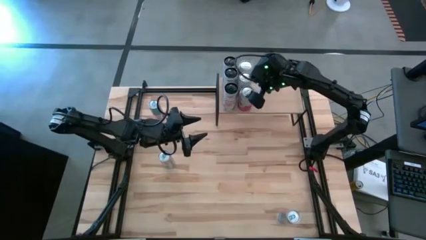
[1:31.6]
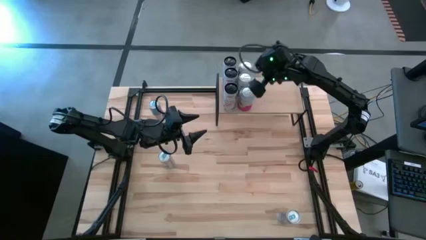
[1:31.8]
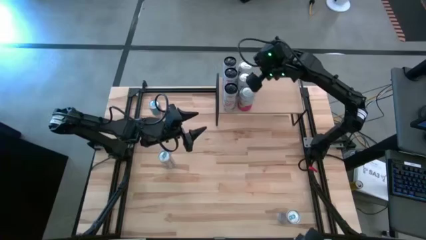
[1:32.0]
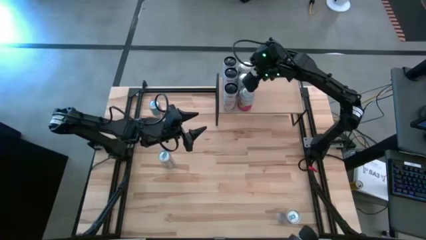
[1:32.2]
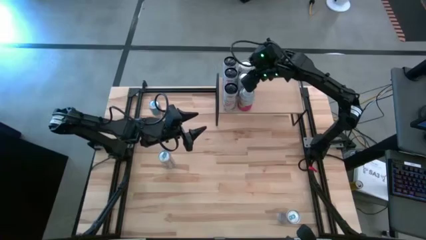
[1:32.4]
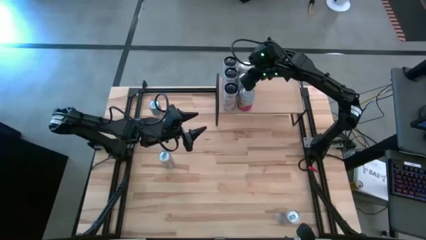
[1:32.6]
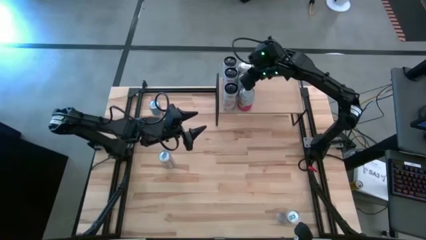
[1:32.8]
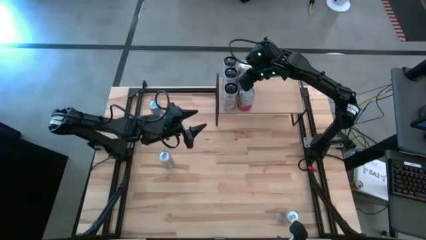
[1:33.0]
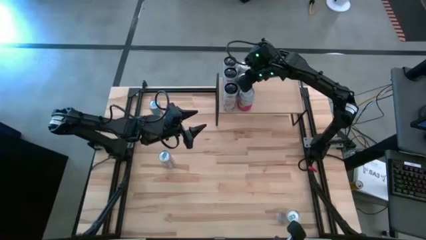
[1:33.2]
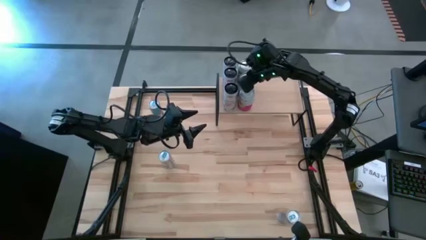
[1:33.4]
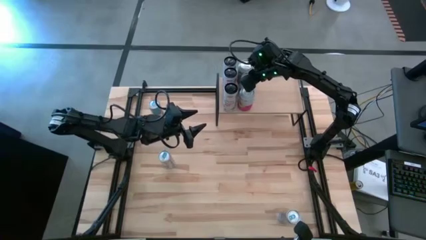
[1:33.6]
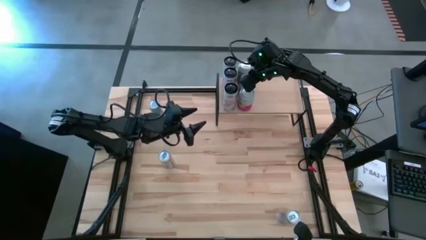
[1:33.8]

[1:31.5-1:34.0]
Task: Place canned beverage on shelf
Adjust the pink-white soda can on the shelf

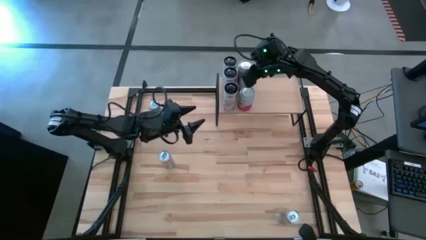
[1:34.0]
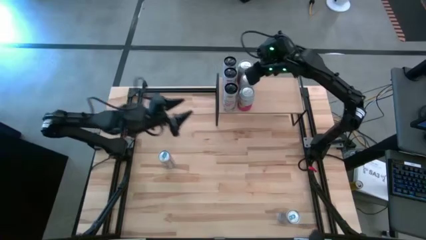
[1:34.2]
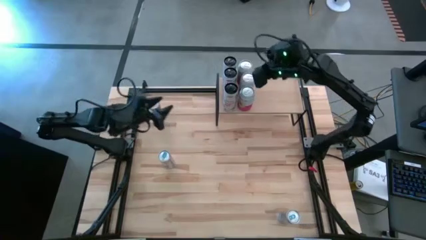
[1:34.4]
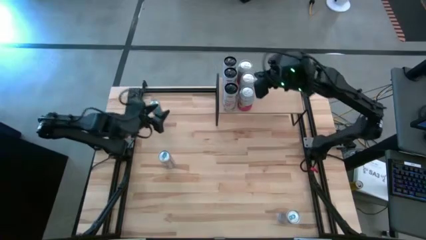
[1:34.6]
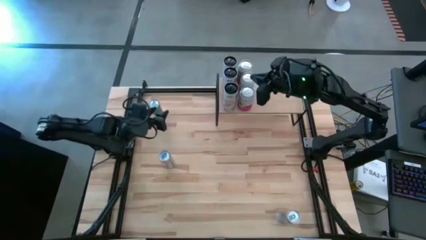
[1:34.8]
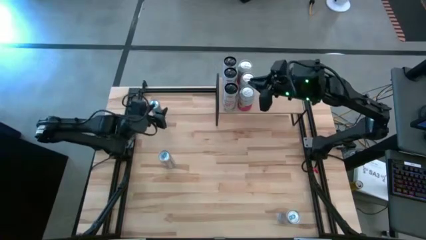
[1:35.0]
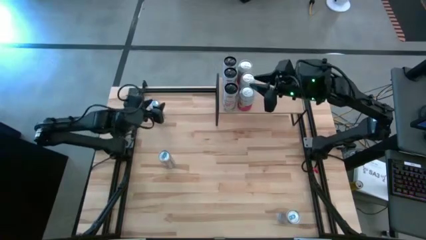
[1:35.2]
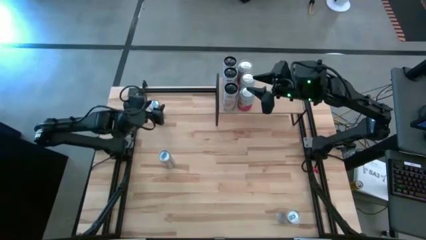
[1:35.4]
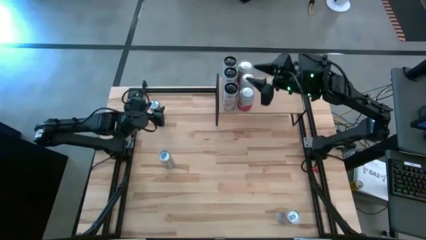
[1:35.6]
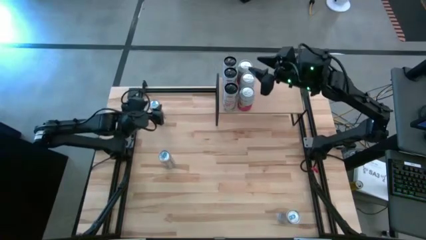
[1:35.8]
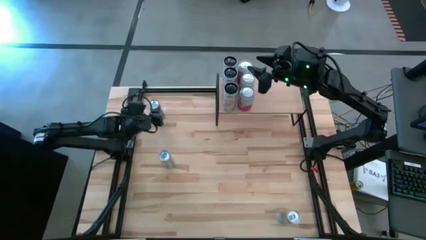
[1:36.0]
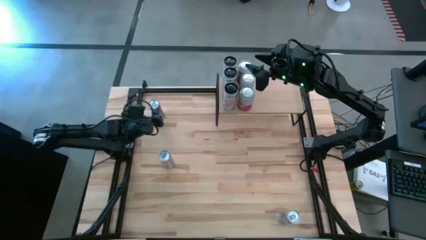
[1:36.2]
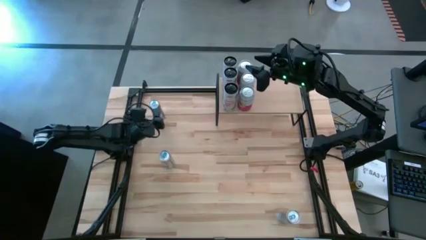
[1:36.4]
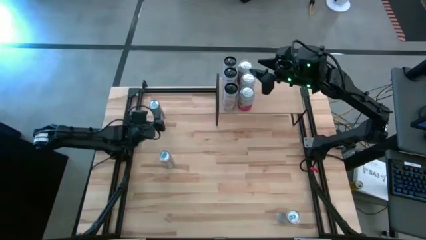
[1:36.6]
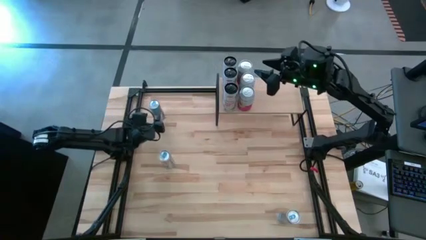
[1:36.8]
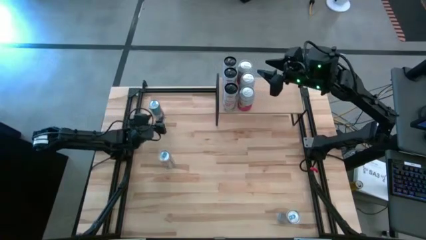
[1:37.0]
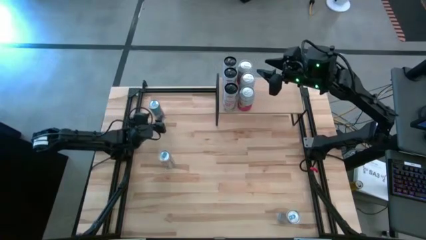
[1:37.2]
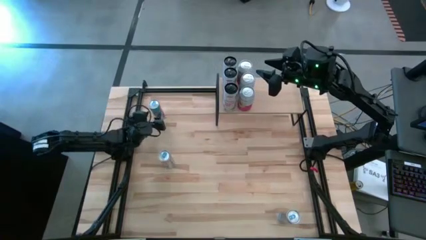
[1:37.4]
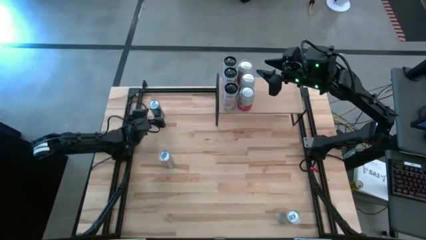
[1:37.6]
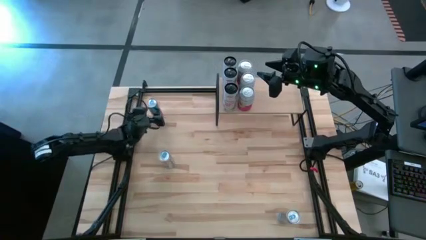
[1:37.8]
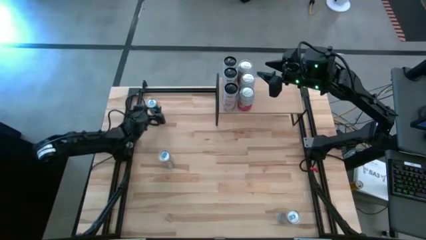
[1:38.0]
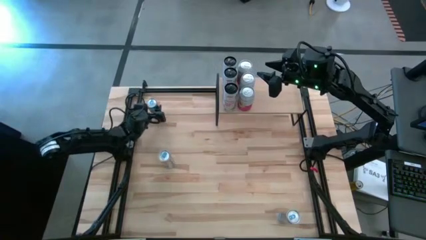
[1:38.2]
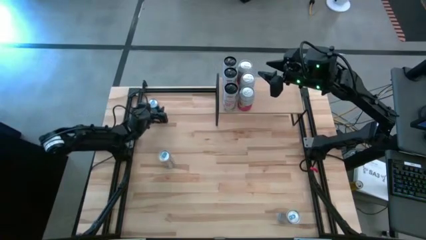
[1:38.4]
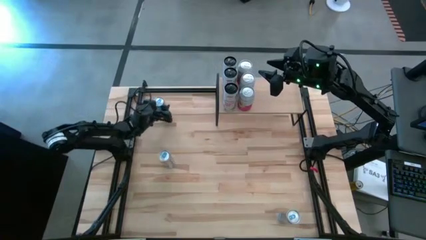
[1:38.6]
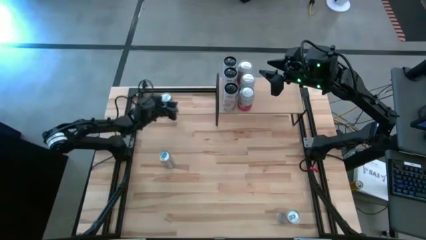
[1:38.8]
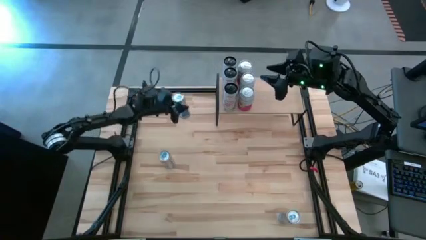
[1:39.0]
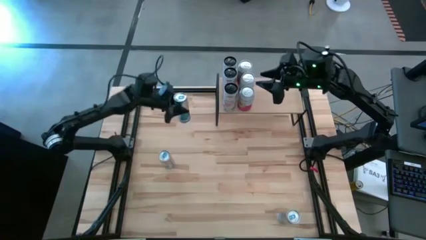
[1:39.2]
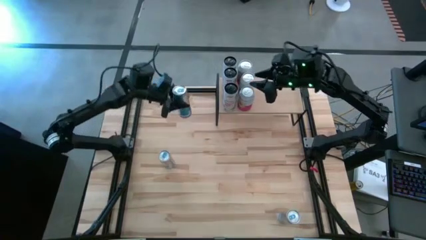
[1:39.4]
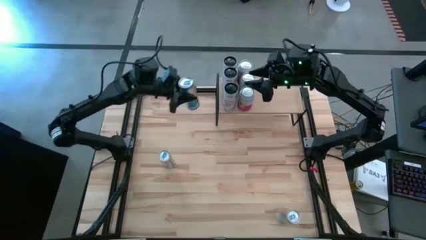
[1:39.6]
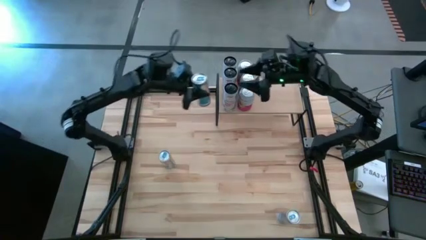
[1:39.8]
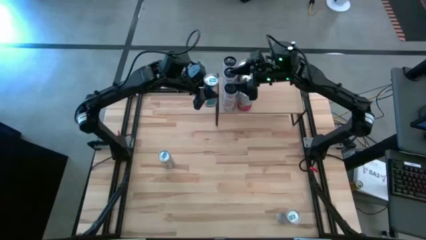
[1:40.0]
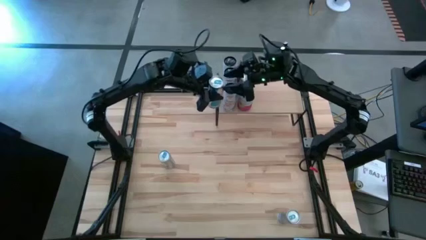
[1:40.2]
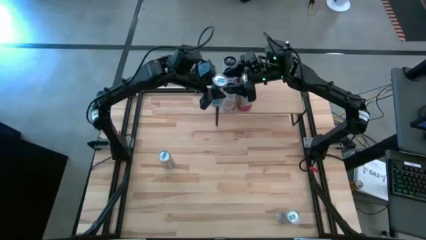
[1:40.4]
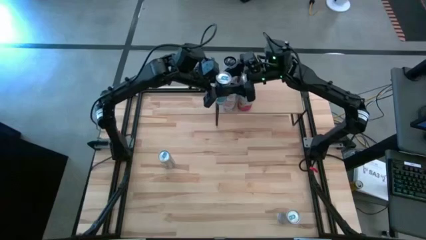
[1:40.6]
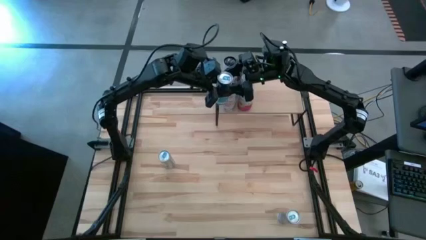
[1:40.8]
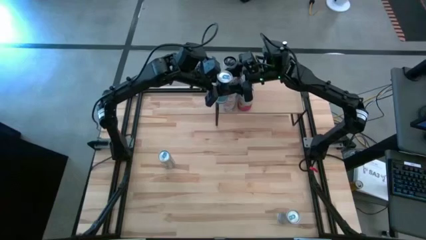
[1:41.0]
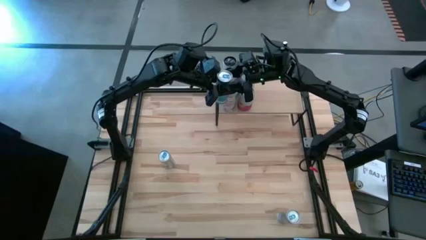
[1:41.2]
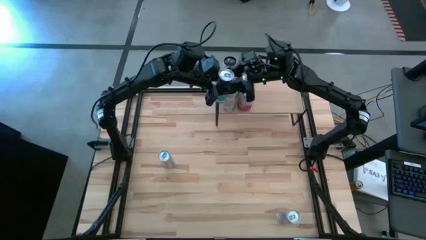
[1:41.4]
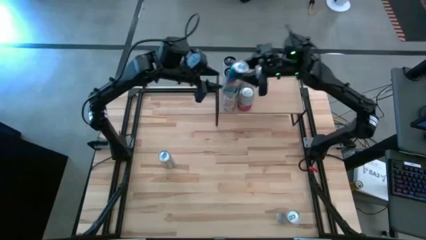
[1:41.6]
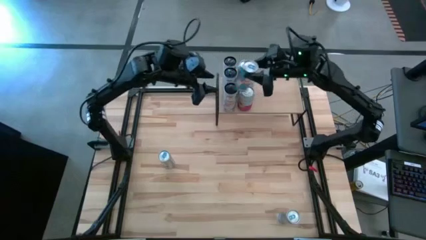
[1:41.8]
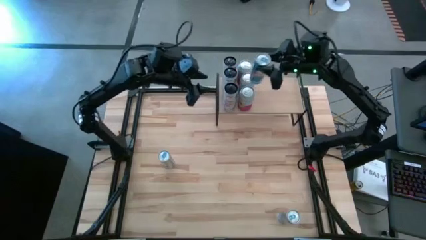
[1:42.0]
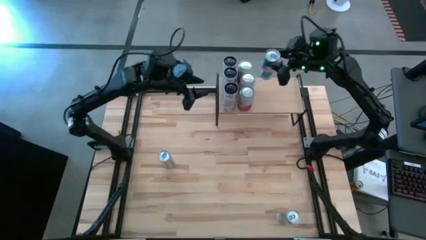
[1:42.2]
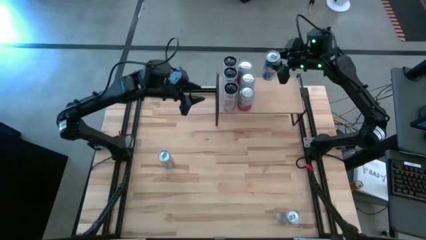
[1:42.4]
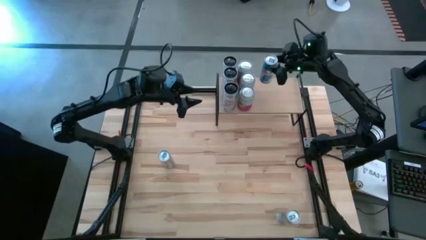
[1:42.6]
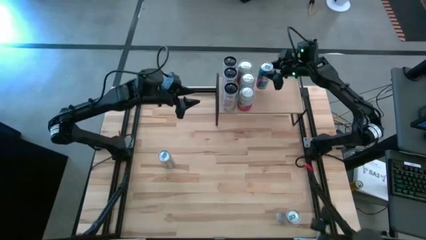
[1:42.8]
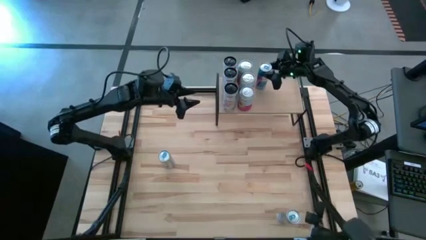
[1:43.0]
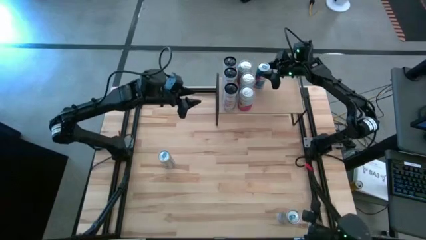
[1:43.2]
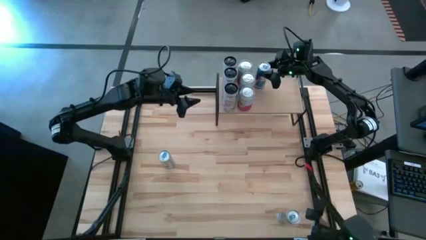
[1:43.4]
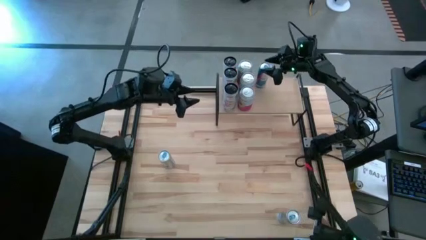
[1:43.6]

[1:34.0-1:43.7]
Put the top blue soda can on the shelf
